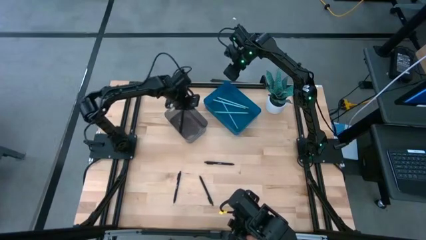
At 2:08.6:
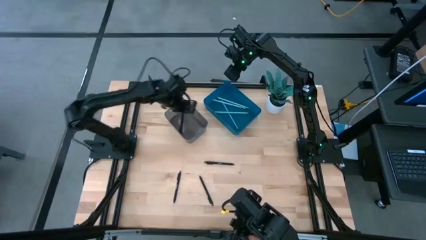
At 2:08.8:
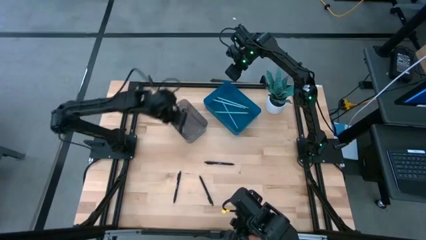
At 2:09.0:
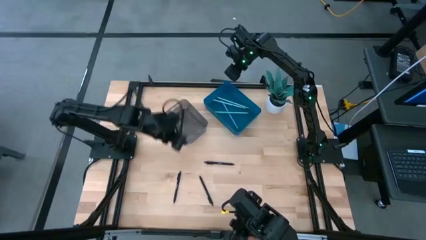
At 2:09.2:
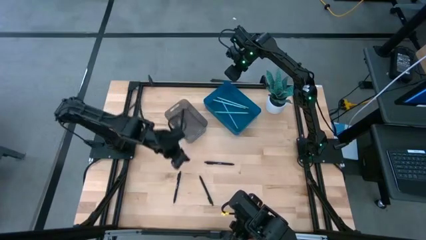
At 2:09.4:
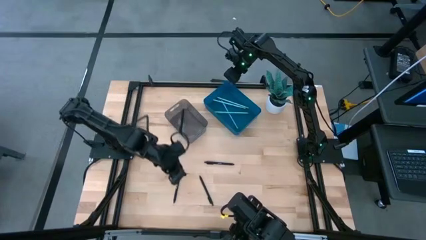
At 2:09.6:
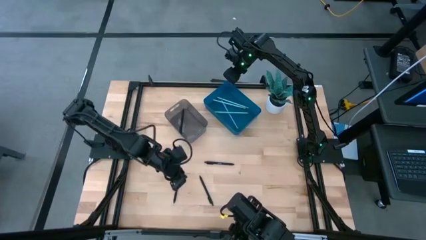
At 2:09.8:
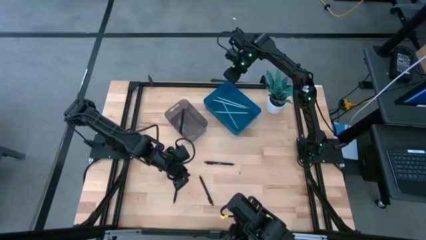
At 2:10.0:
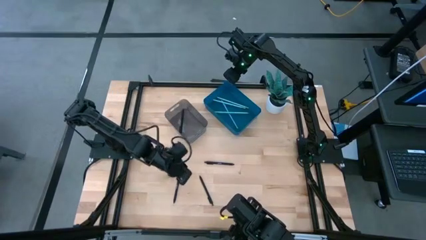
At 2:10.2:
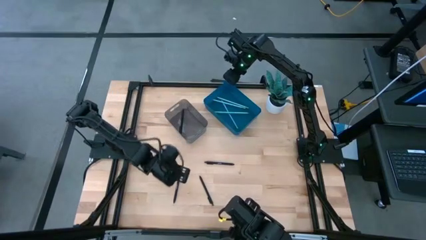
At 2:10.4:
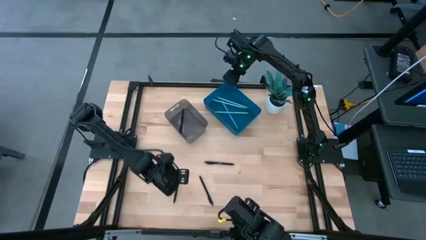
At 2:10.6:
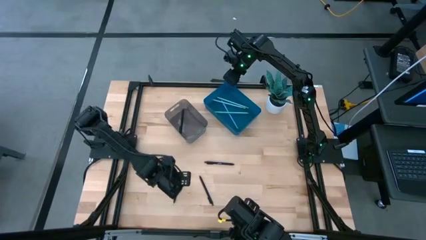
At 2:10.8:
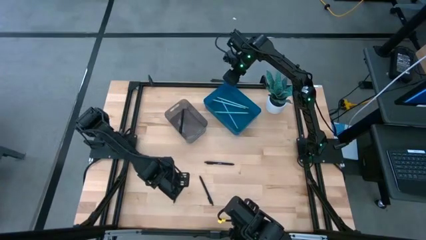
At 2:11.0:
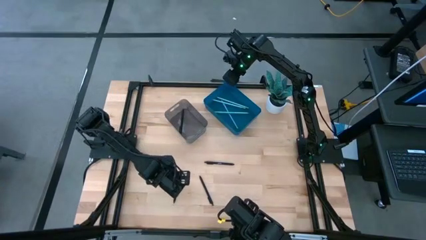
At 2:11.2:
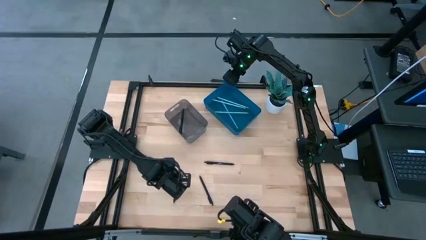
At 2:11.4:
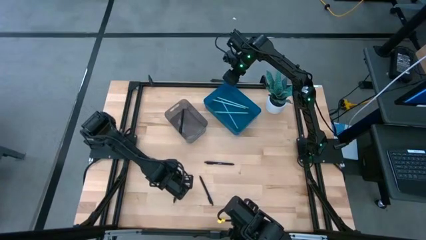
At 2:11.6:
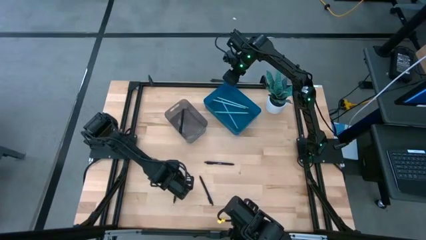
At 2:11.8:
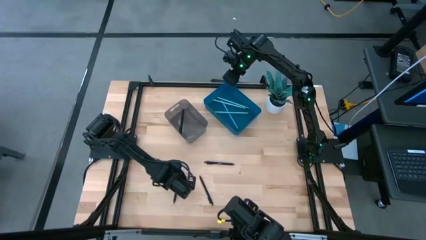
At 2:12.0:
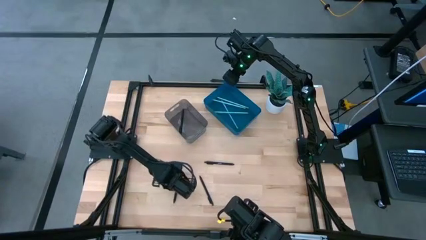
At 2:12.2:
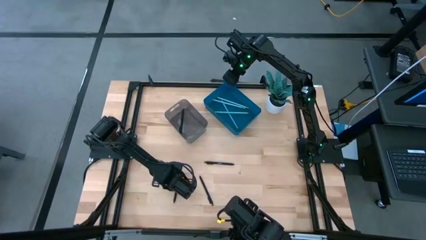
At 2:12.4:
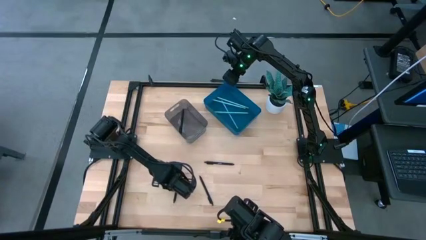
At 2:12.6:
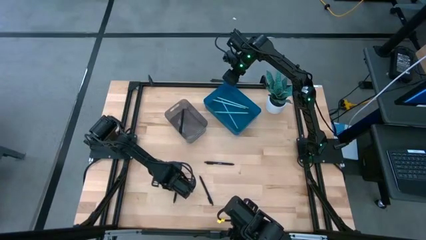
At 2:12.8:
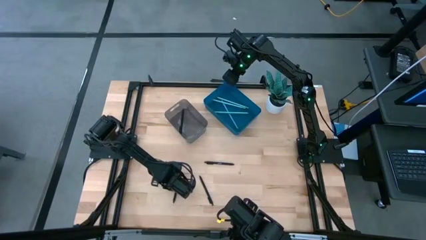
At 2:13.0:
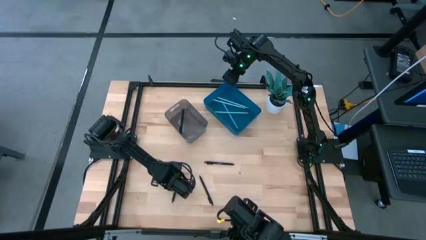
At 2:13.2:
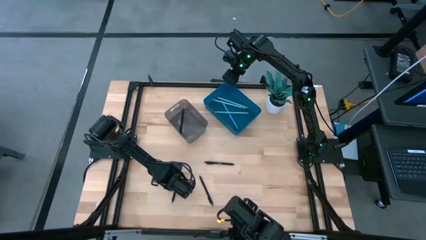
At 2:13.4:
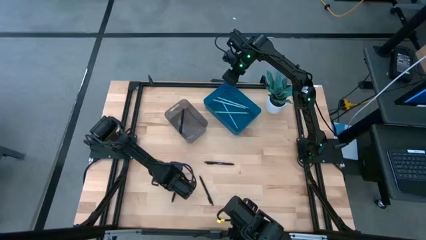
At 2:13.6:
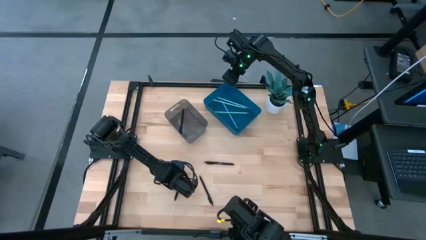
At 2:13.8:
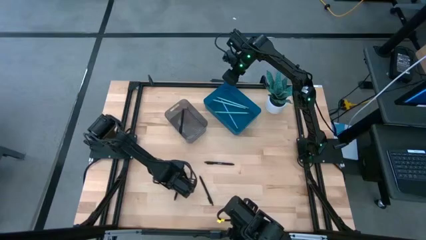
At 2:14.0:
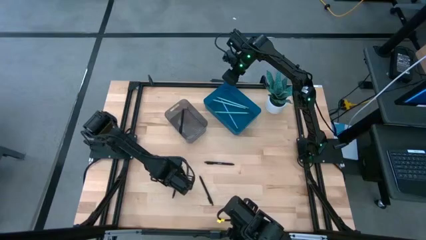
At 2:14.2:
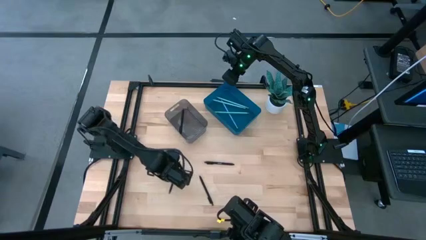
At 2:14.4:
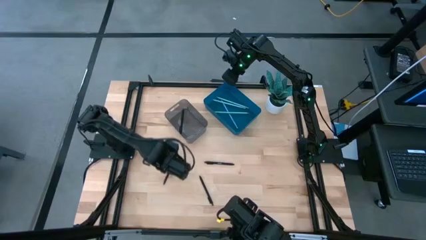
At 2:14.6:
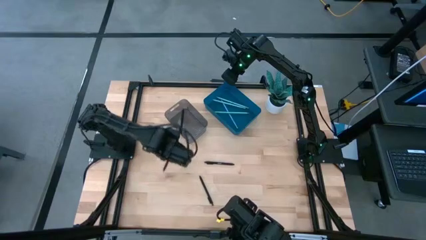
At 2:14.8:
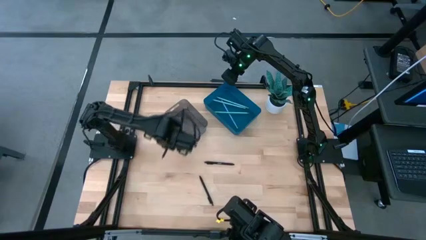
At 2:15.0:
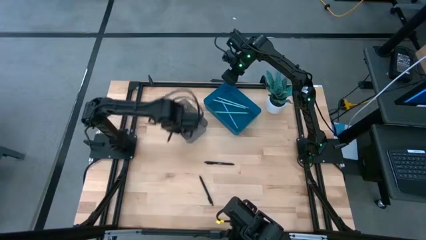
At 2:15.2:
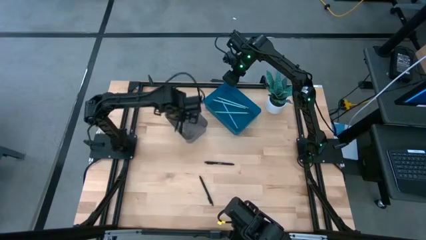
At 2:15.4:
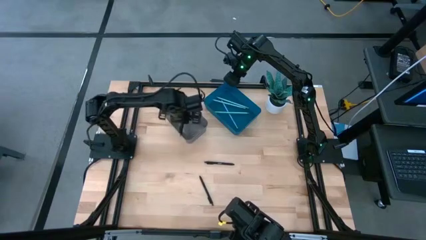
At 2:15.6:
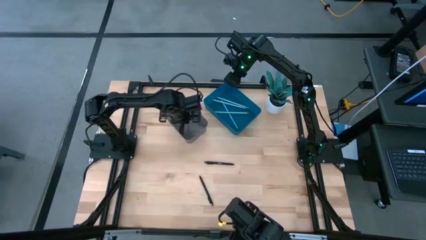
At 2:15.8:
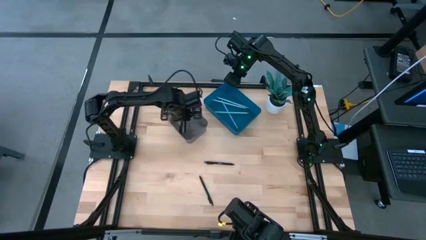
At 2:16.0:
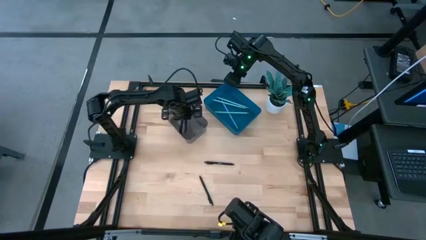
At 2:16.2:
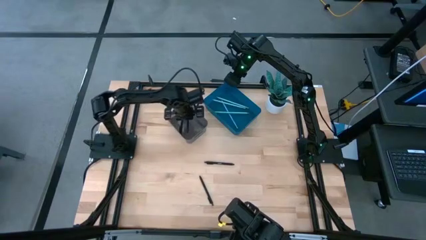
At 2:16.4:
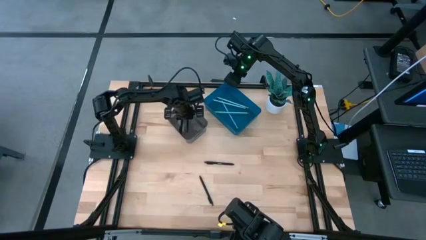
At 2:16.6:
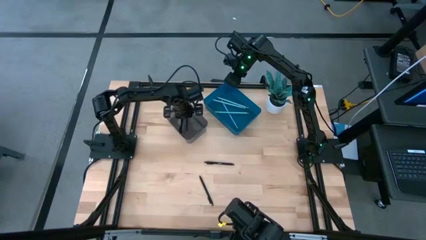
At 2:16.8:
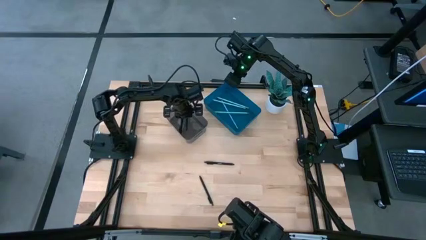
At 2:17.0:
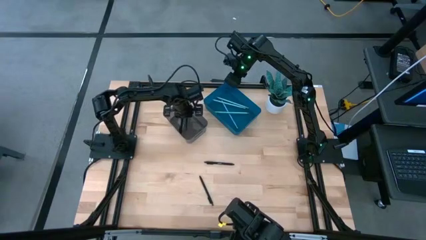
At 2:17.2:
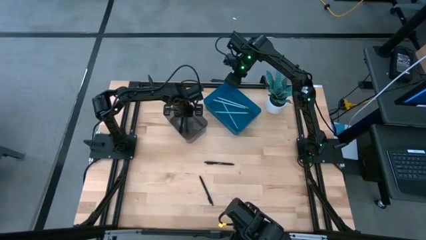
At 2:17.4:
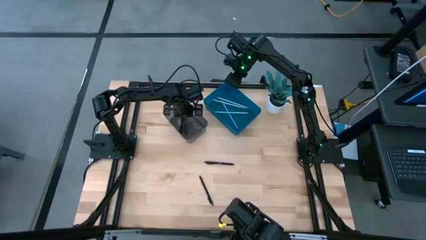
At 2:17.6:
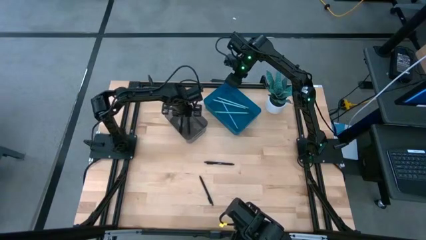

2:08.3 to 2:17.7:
Task: Sort pens & pencils
Put the black pen into the black bin

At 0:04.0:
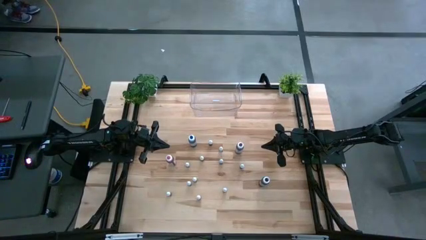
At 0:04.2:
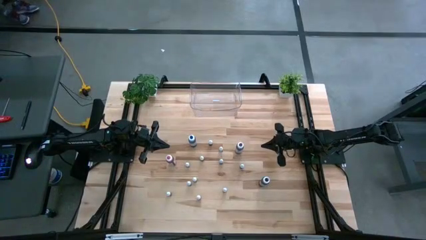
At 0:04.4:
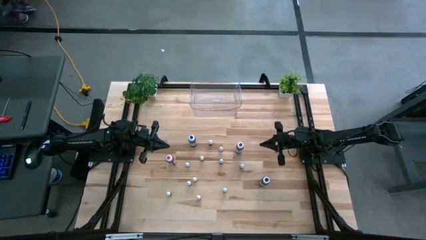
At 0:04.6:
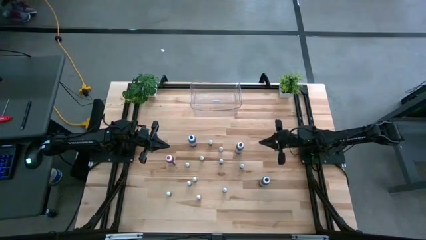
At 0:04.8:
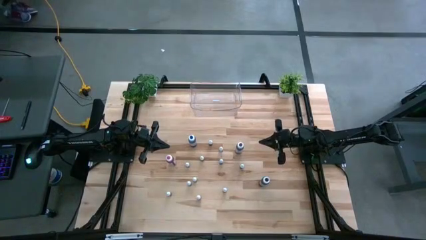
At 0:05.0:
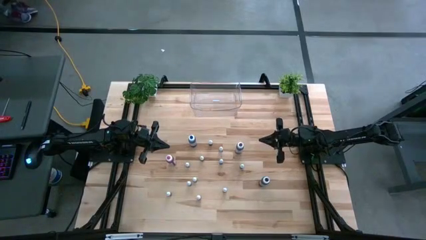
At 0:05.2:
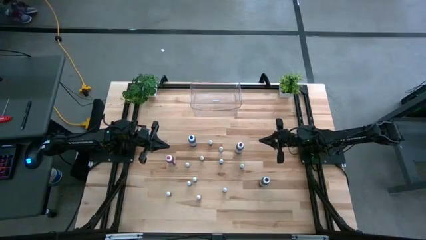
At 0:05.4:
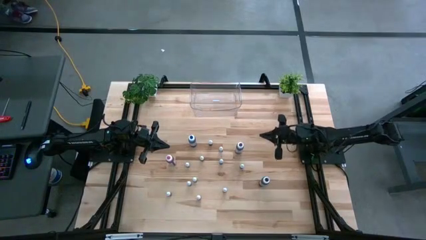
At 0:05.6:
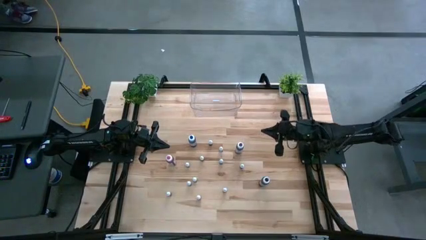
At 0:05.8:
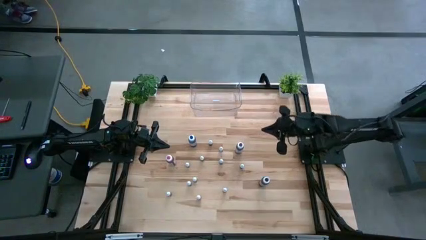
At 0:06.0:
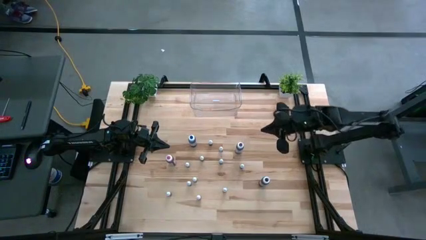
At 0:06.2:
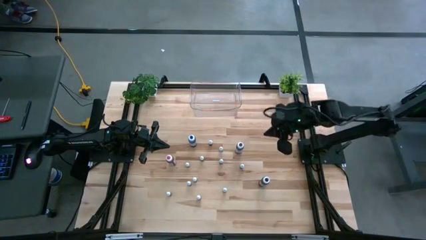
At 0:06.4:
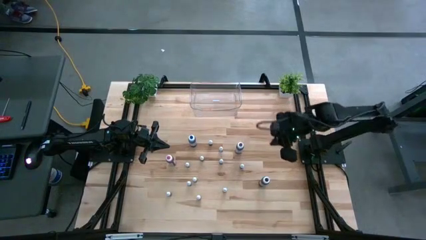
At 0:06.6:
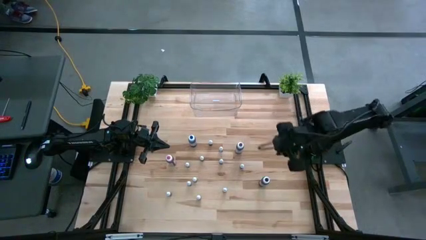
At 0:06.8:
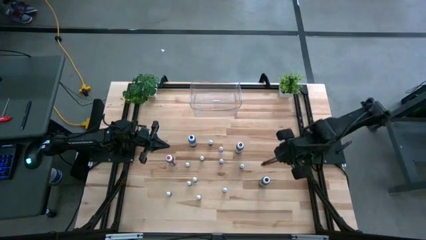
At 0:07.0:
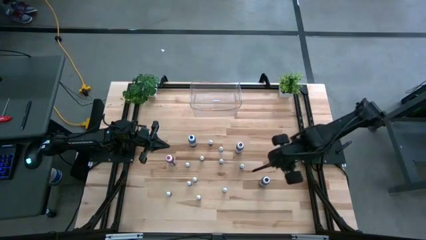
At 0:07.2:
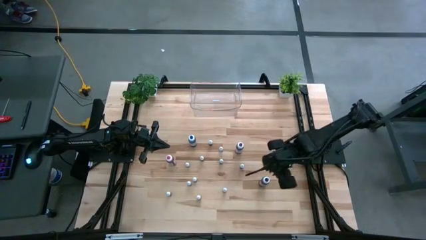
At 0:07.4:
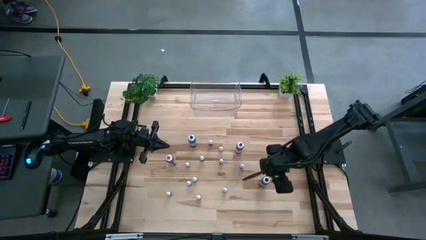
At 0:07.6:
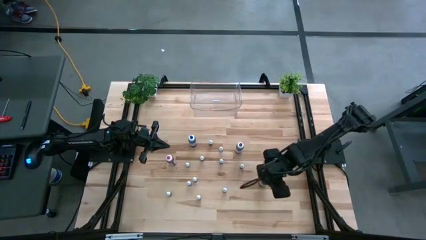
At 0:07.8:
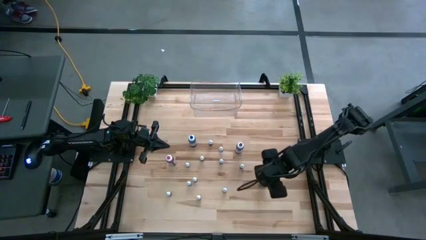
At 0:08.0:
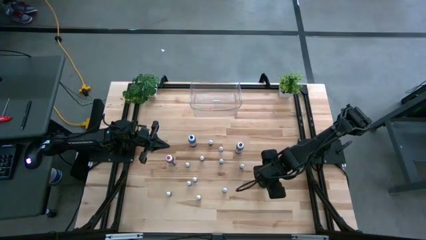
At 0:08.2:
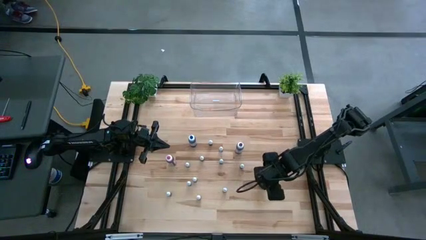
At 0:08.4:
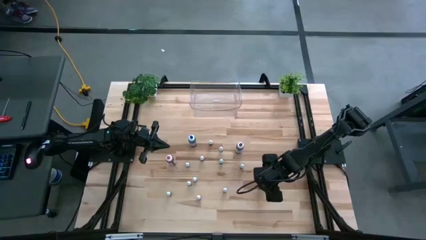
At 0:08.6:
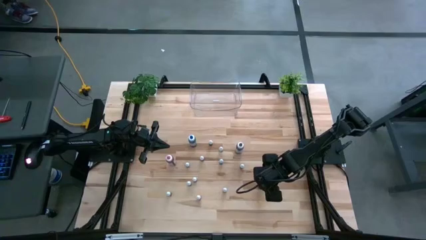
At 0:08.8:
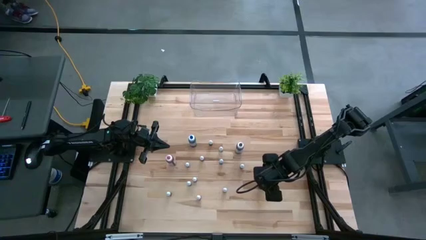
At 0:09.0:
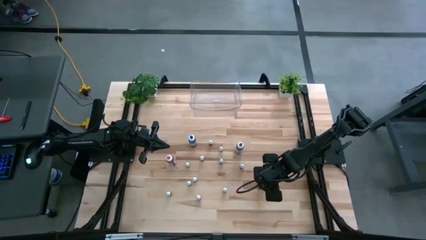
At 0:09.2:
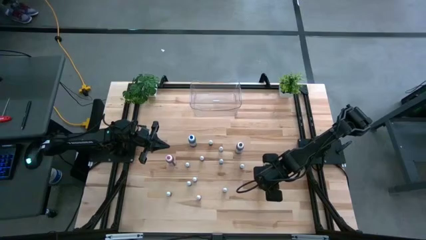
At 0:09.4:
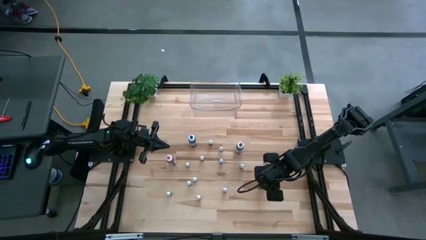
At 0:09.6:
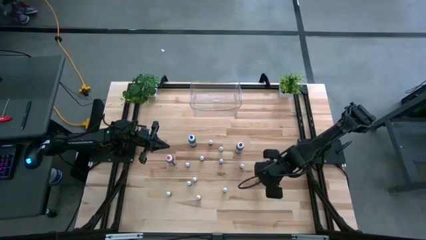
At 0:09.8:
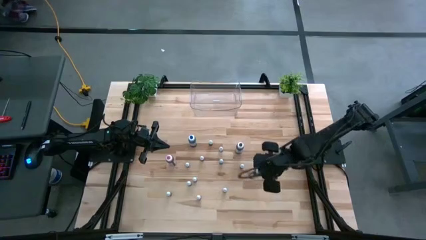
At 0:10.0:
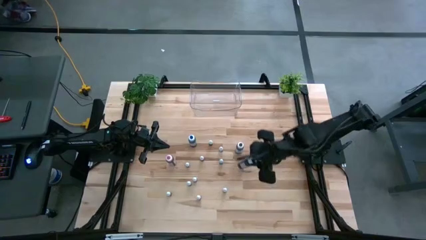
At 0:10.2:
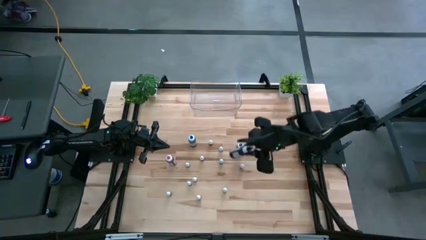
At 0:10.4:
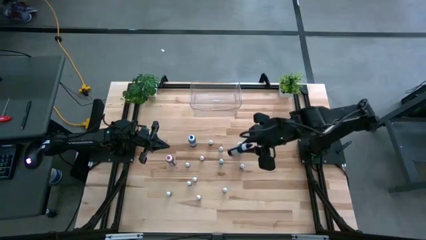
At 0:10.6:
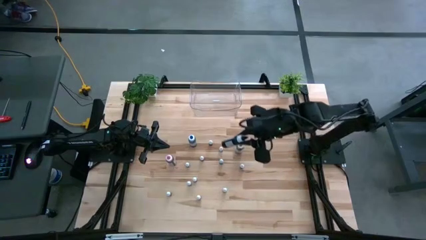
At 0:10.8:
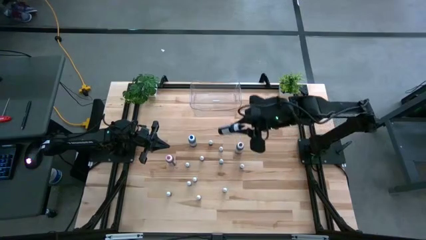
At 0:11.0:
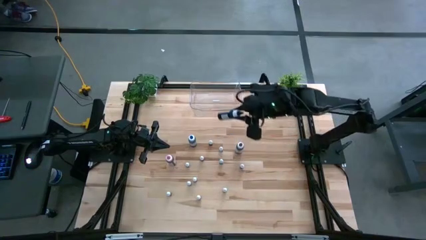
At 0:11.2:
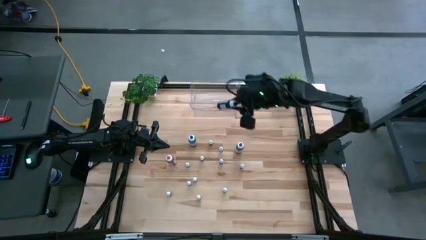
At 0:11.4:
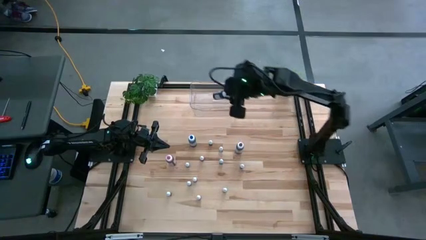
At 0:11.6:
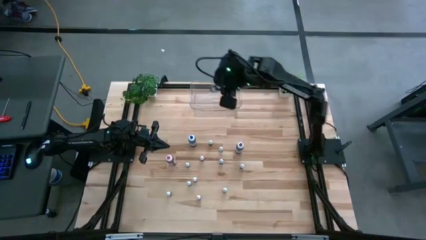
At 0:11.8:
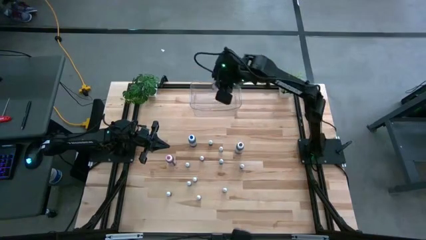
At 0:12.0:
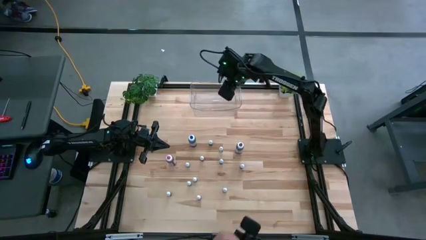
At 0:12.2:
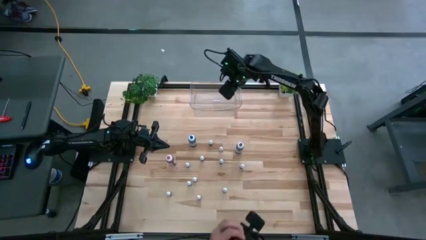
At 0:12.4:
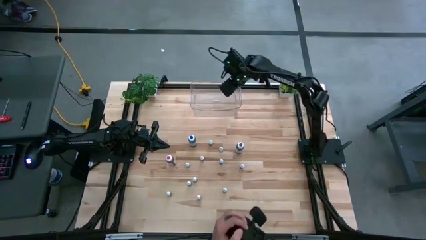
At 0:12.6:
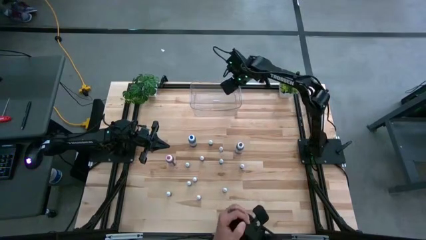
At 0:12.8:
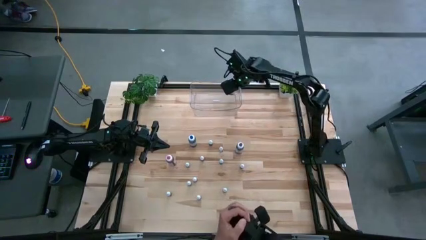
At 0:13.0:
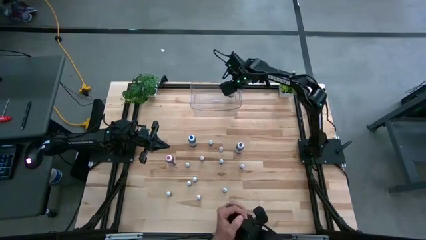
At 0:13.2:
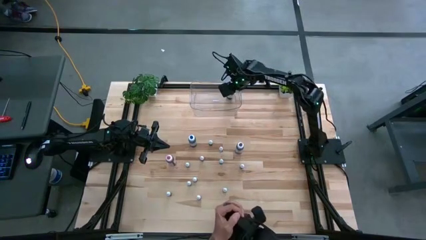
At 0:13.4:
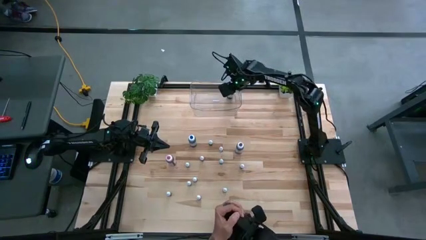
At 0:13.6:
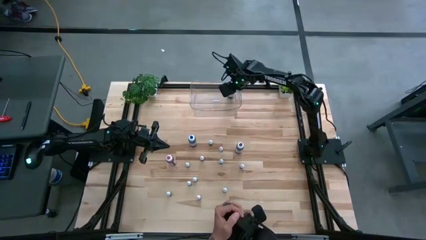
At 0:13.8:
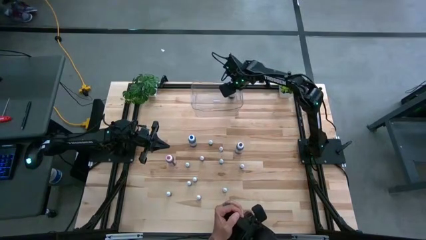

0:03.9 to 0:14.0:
Task: Pick & Place food coloring
Put the large black food coloring bottle into the transparent bin
